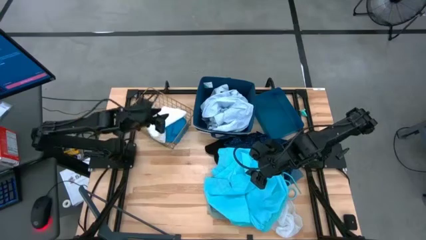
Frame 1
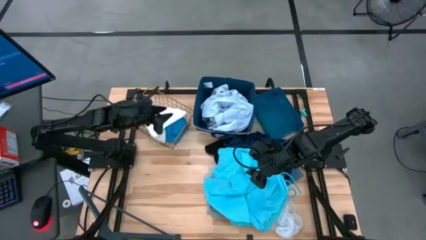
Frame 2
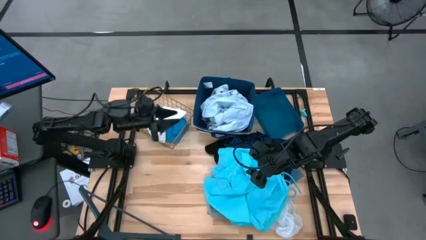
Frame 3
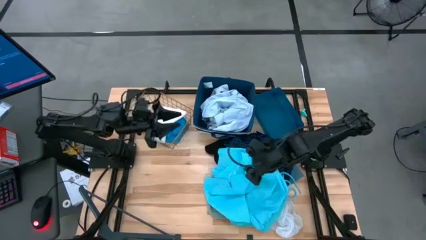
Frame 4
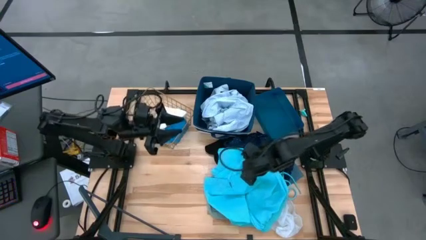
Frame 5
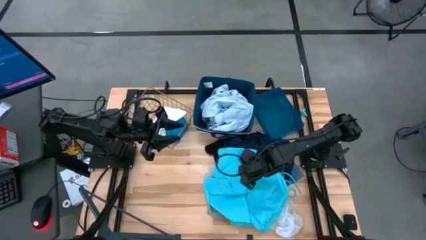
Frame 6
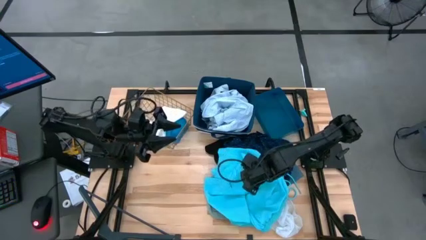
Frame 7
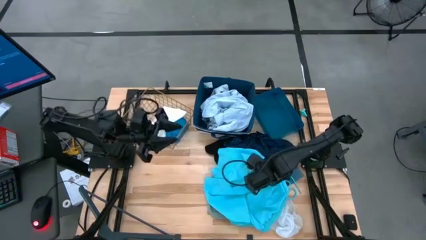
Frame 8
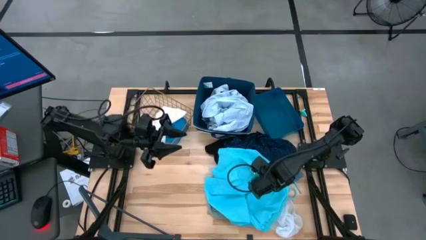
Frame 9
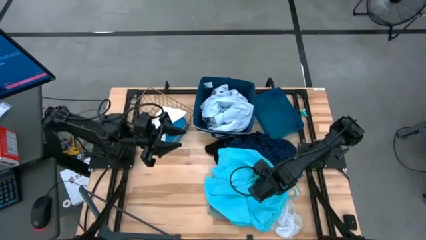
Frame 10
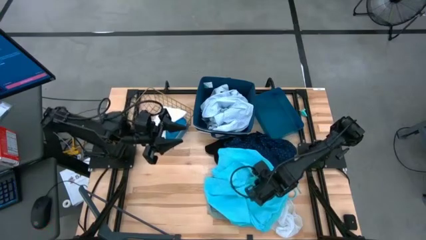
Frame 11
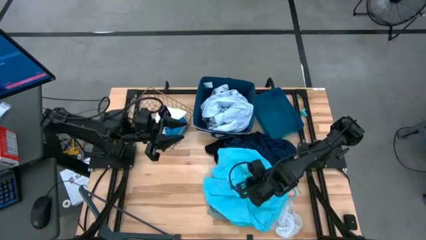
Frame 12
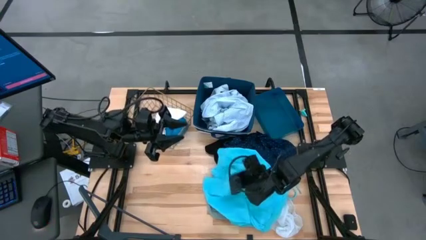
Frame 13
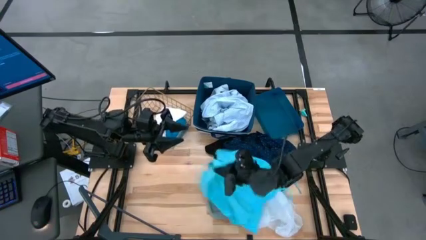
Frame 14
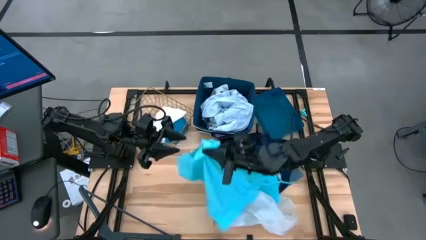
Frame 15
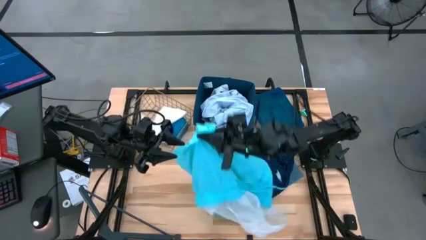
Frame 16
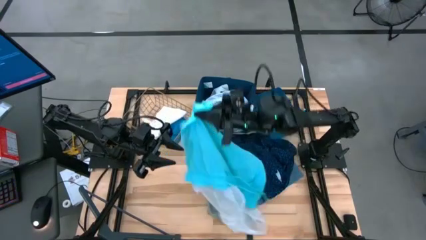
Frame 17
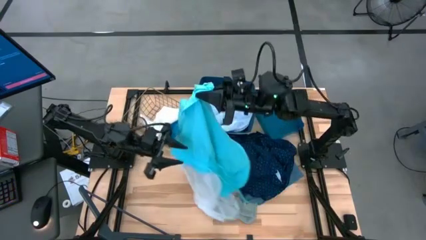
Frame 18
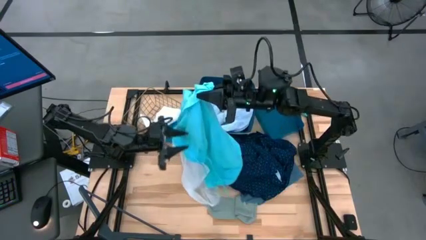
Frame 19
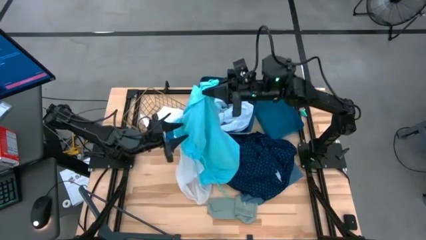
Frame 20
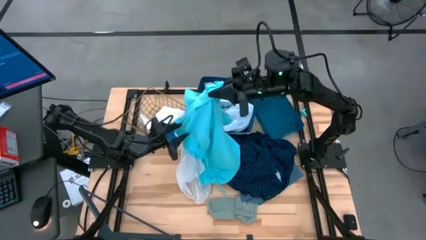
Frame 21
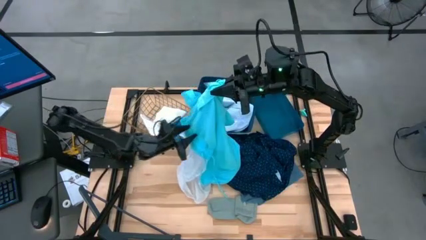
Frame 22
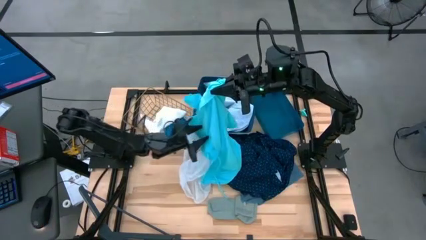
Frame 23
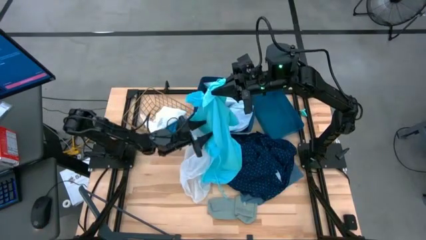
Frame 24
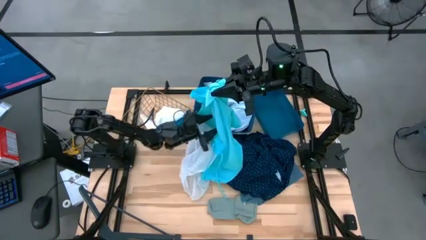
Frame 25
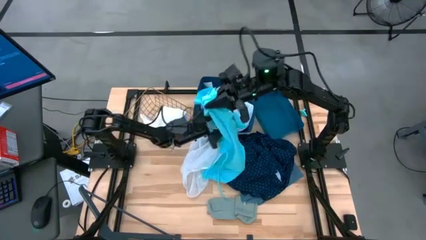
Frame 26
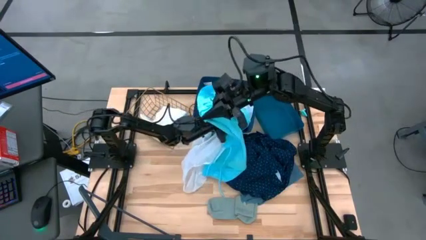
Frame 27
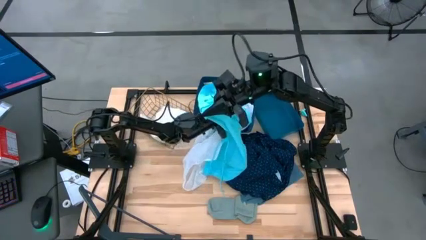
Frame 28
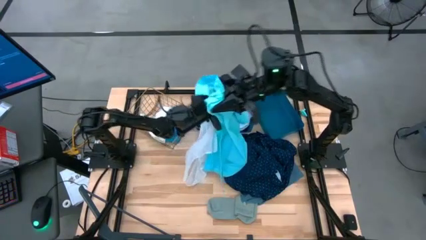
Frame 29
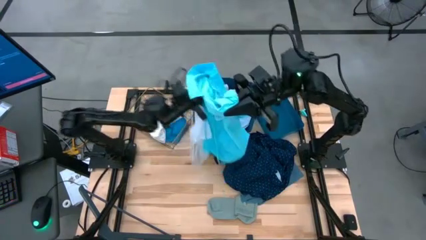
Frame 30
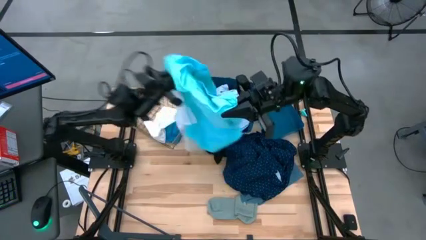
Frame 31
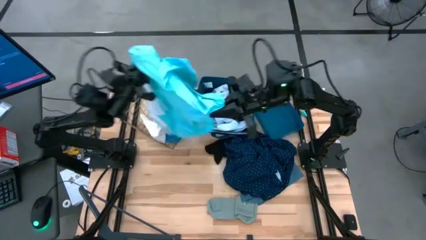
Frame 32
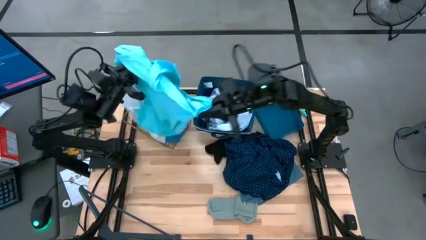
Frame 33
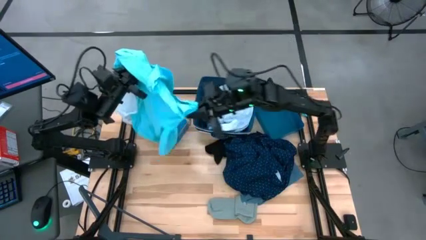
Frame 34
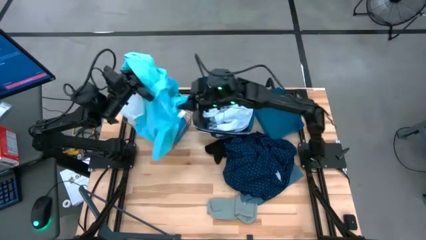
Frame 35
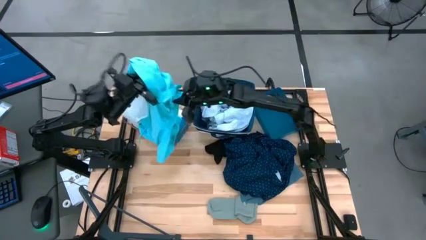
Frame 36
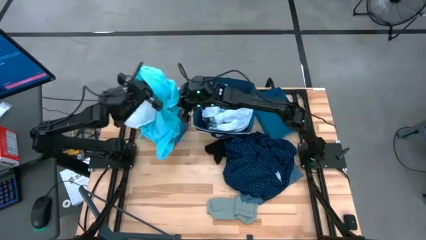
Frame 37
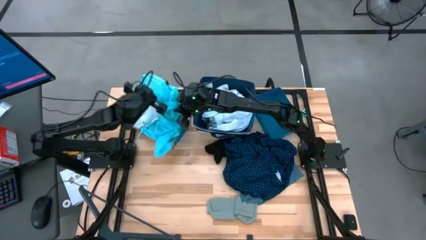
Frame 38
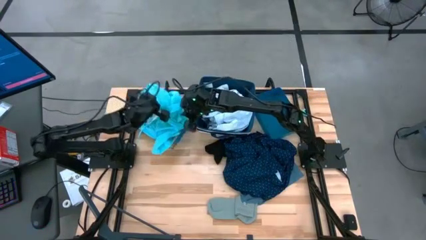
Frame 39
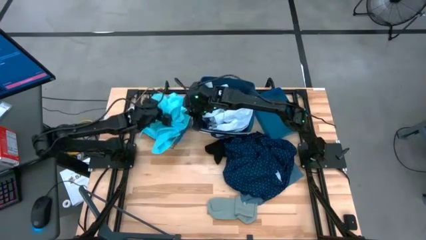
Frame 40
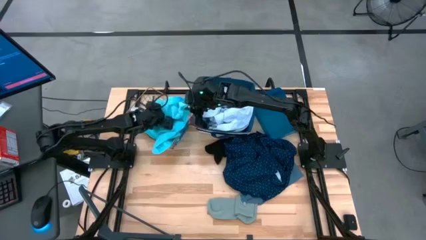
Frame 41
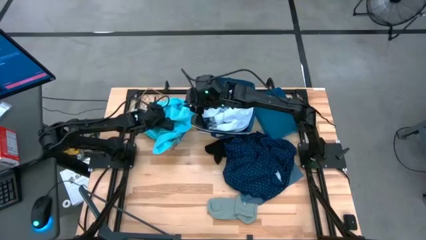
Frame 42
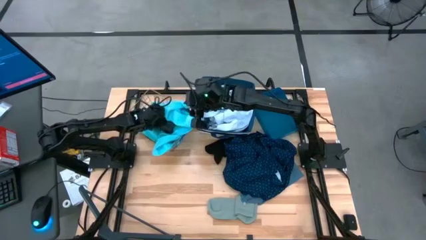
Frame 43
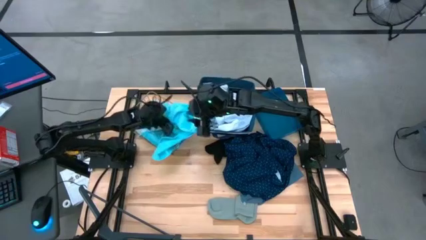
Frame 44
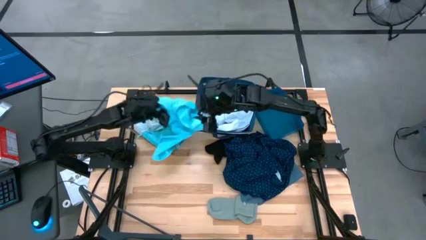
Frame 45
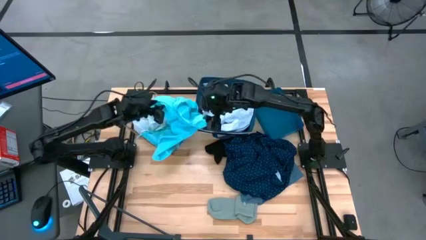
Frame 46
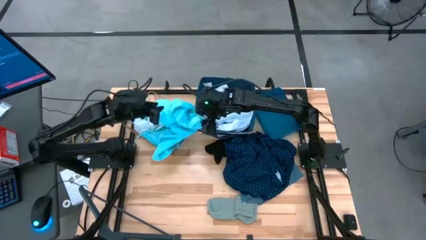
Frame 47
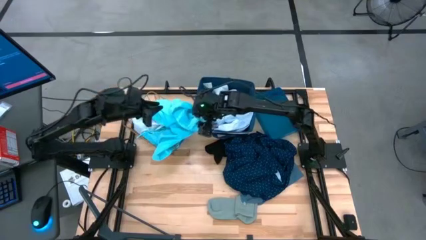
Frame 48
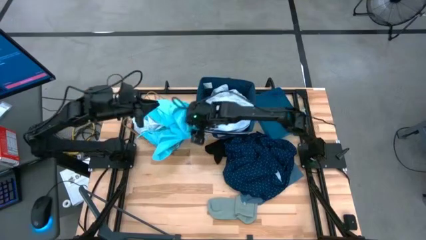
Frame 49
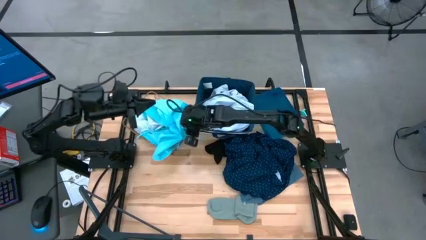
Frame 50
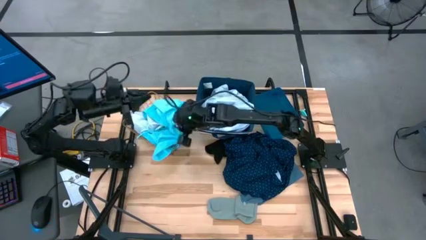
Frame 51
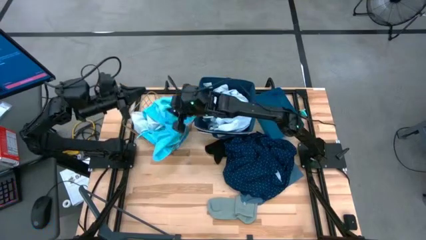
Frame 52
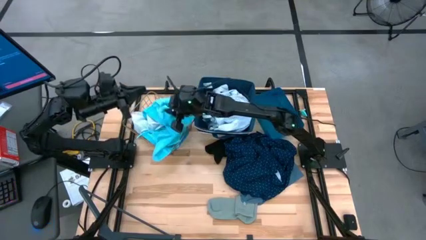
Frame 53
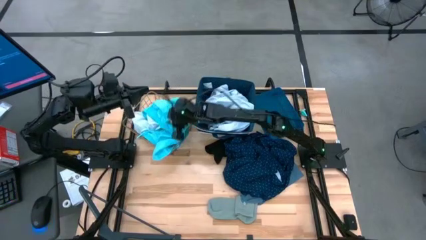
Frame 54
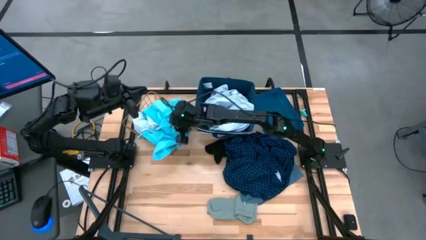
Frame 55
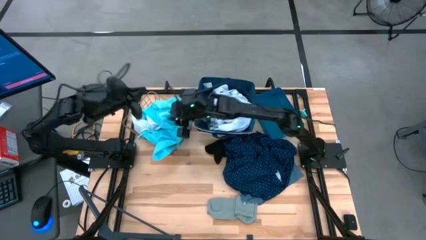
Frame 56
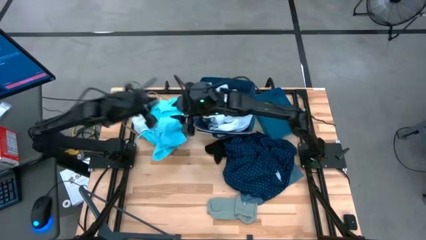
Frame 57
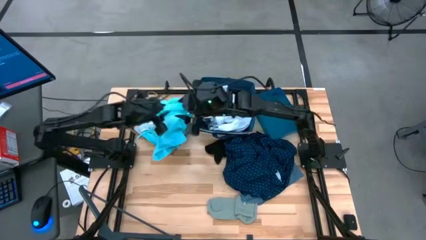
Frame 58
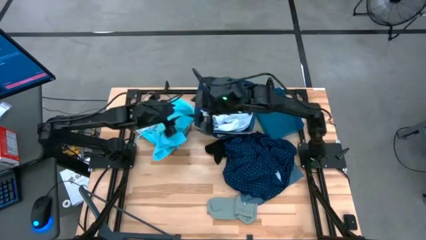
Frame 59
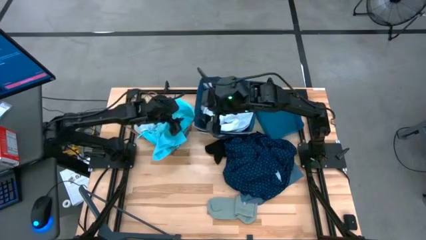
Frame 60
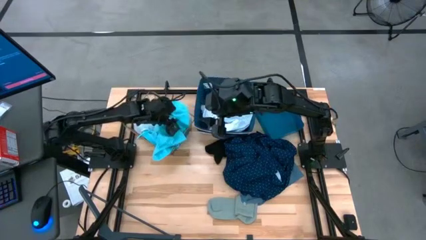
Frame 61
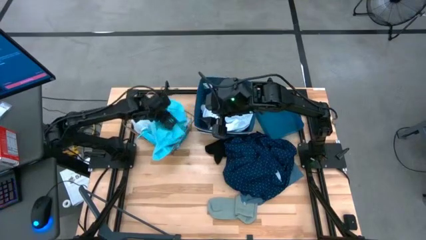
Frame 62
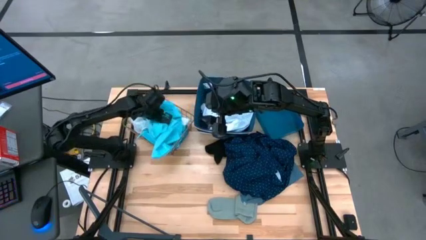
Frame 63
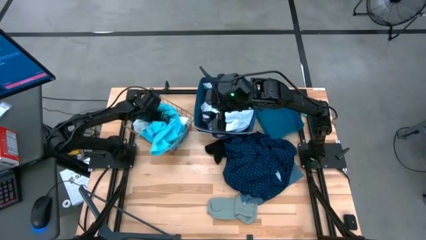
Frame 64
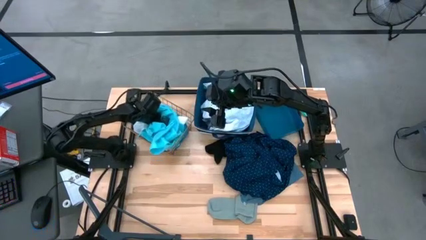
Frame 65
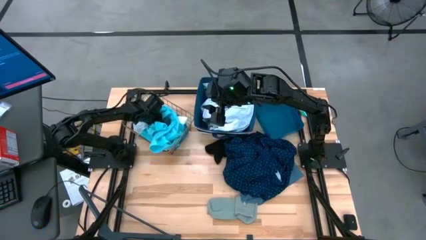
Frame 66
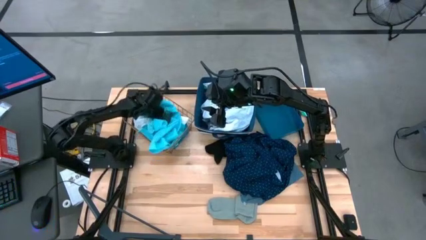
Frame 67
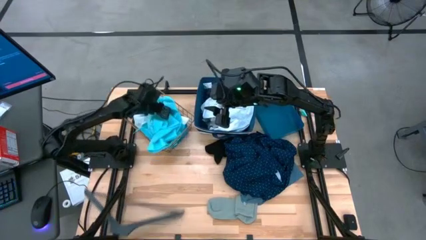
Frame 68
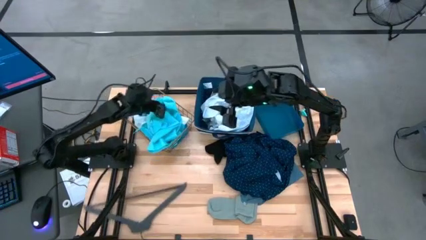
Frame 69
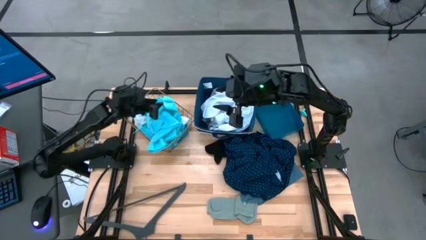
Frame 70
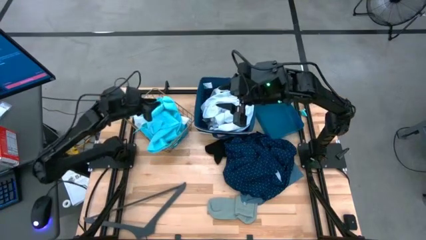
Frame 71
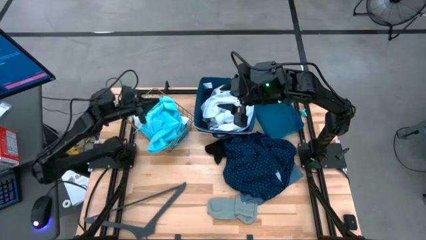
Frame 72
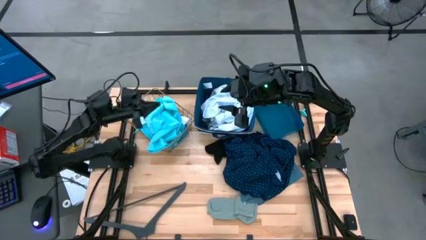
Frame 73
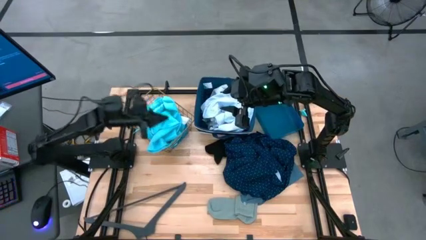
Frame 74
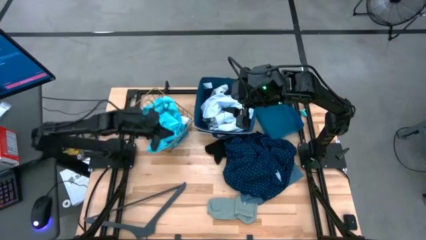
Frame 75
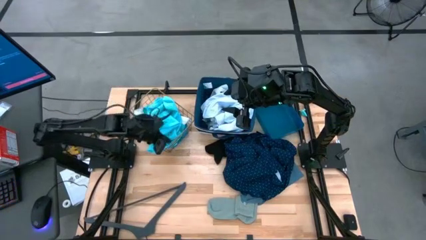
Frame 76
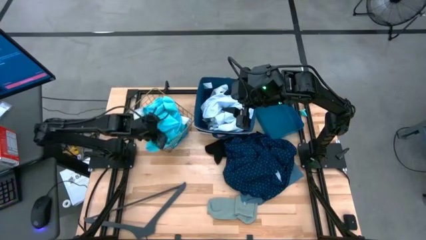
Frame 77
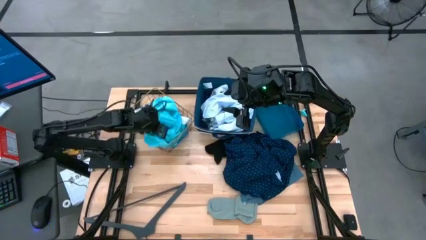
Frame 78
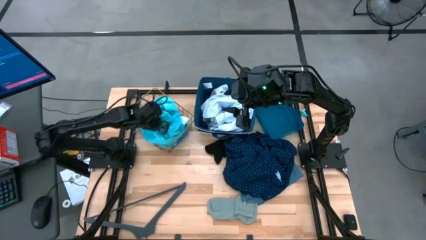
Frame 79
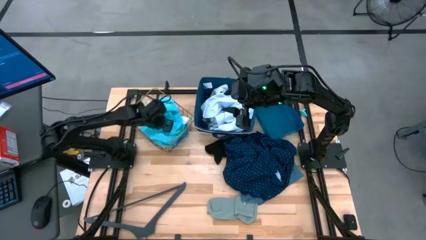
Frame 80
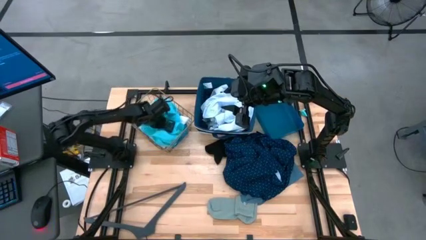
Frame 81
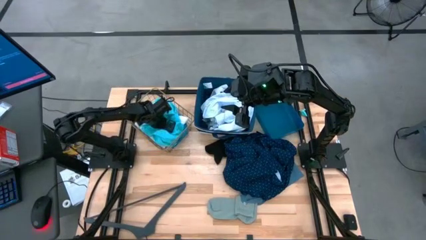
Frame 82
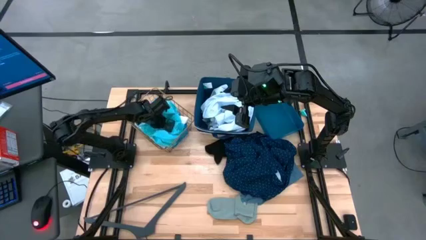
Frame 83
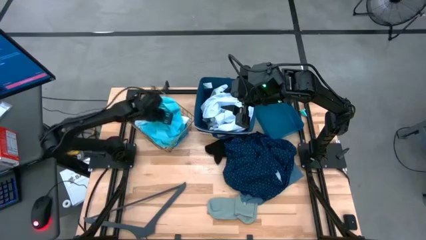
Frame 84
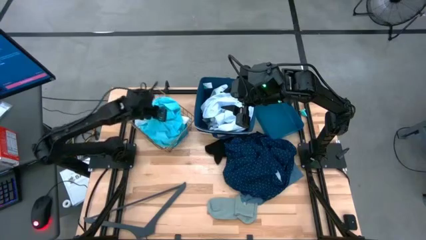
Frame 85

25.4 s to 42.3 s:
Task: Pick & Place Cloths
Put the blue shorts into the gold wire basket
